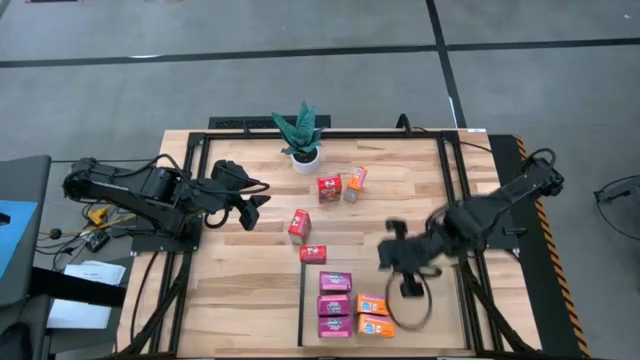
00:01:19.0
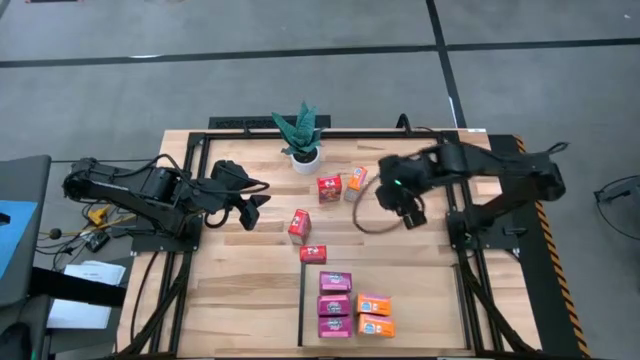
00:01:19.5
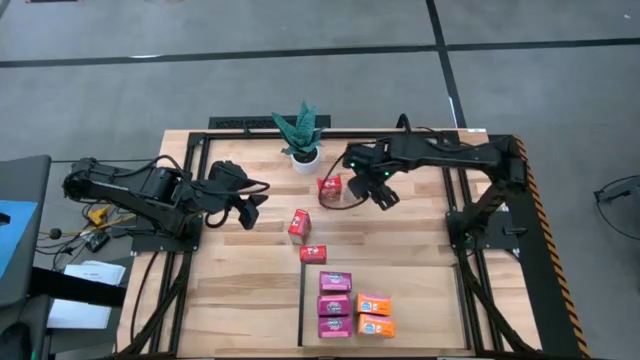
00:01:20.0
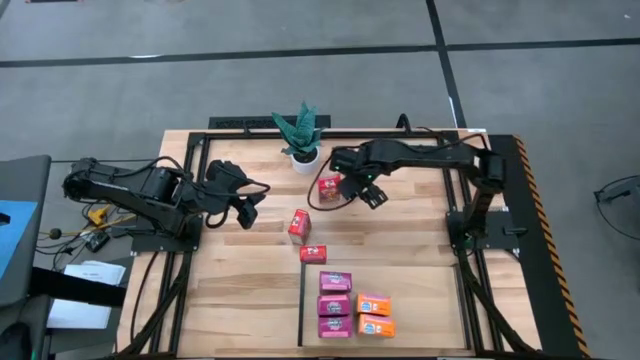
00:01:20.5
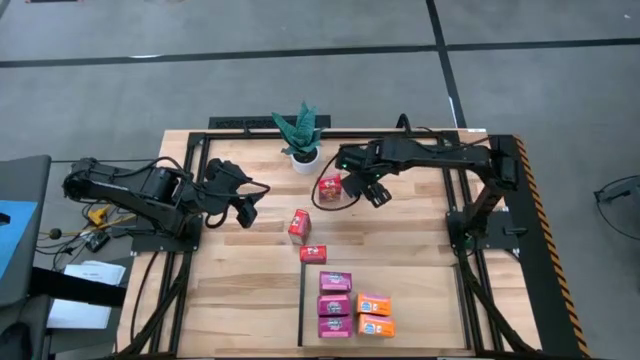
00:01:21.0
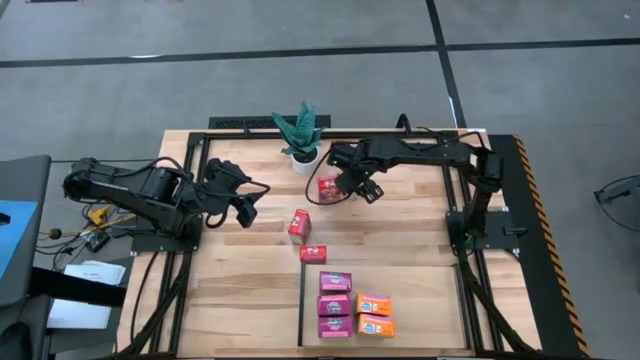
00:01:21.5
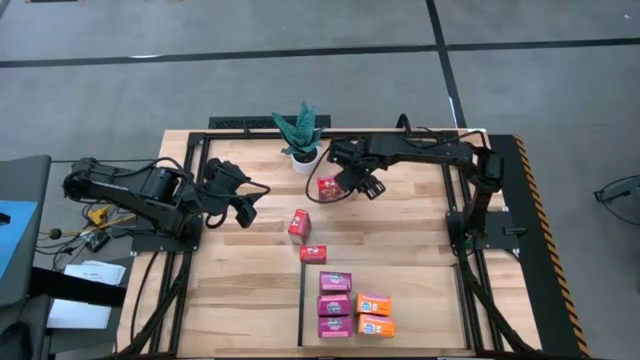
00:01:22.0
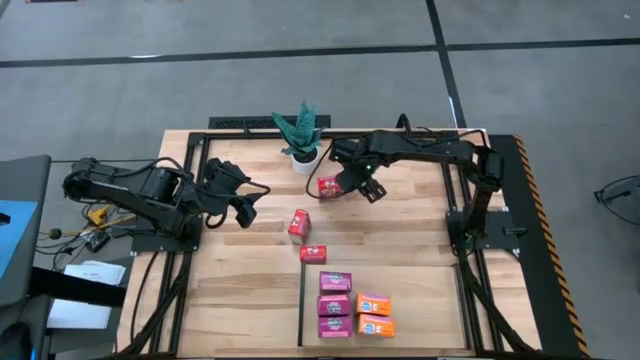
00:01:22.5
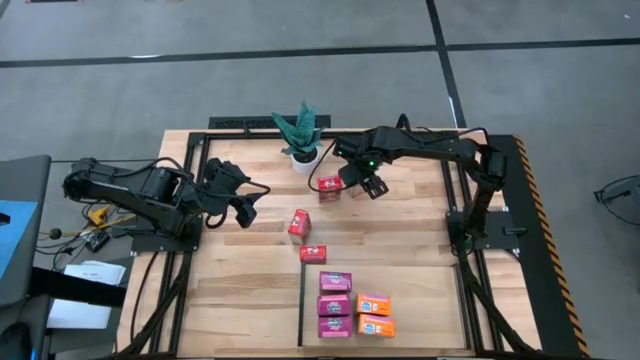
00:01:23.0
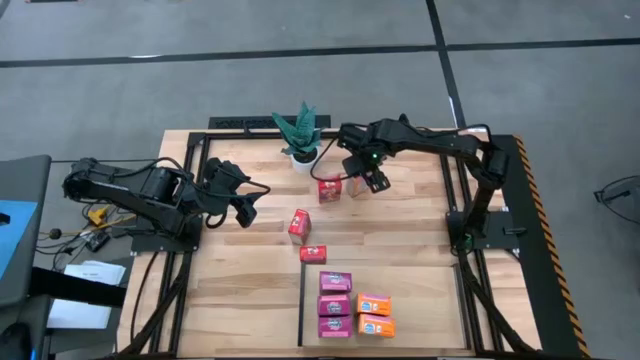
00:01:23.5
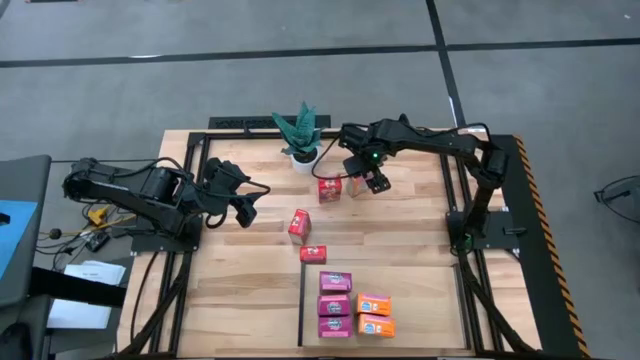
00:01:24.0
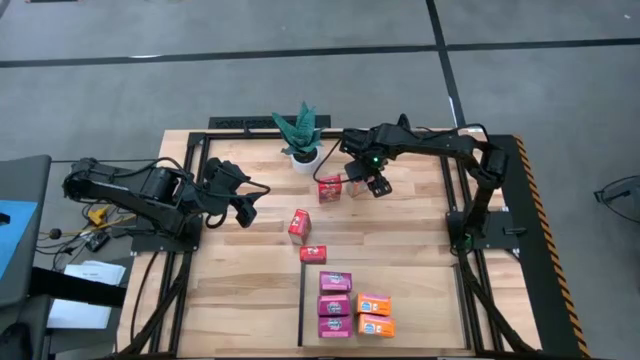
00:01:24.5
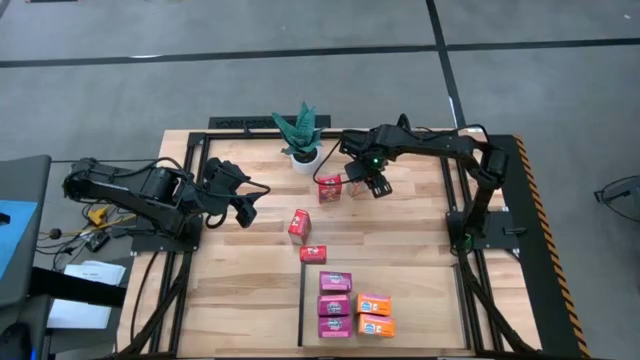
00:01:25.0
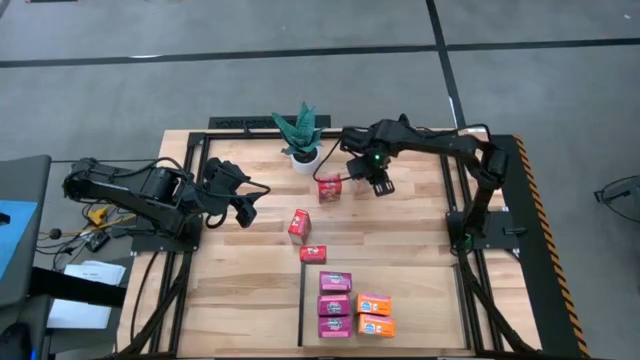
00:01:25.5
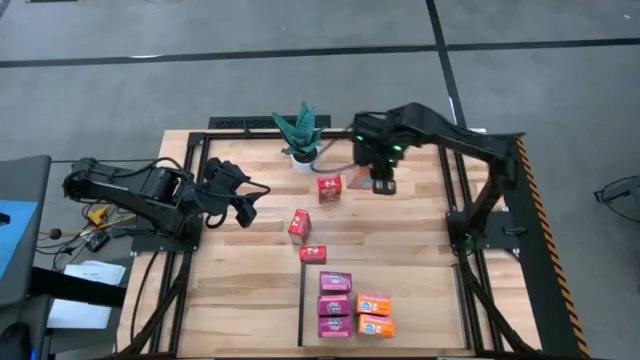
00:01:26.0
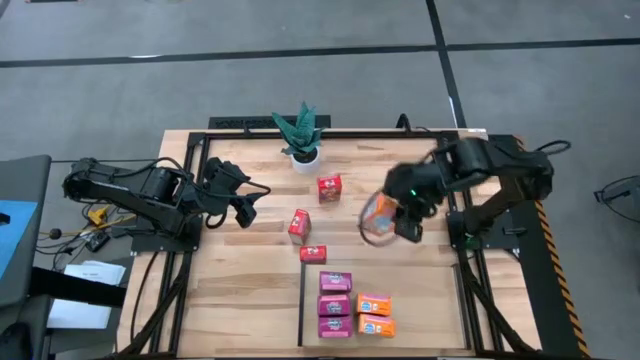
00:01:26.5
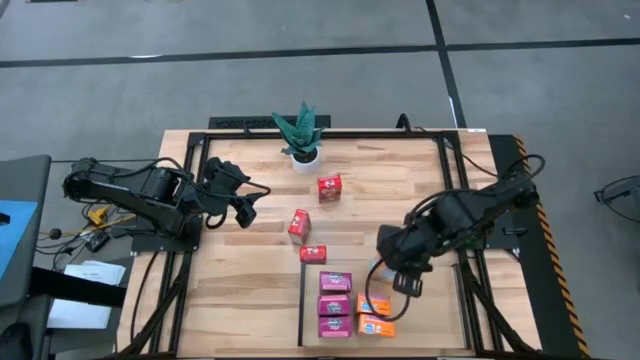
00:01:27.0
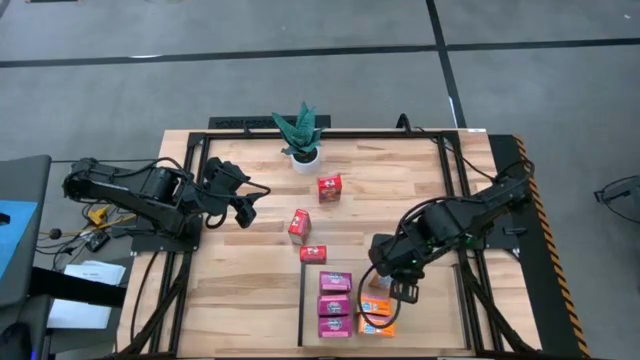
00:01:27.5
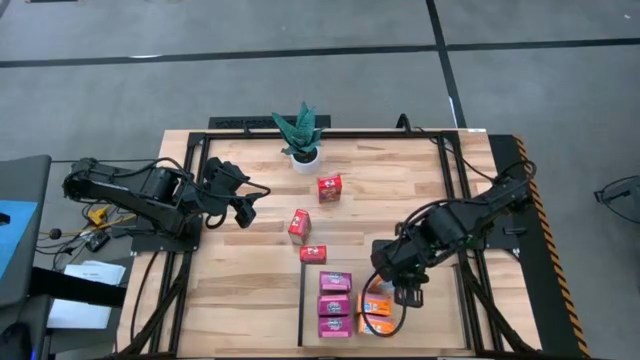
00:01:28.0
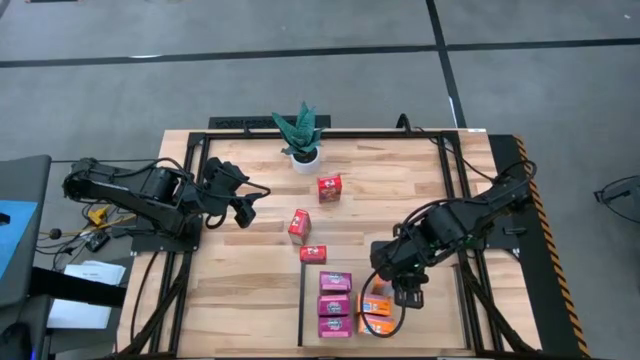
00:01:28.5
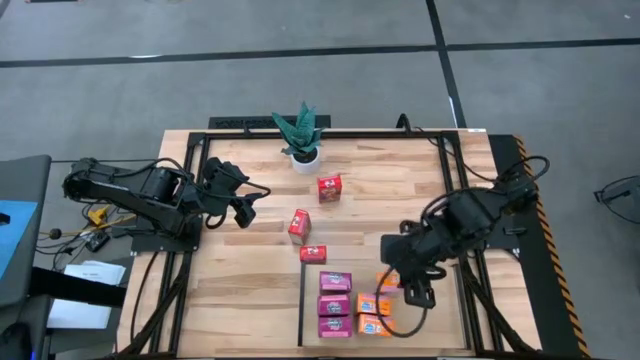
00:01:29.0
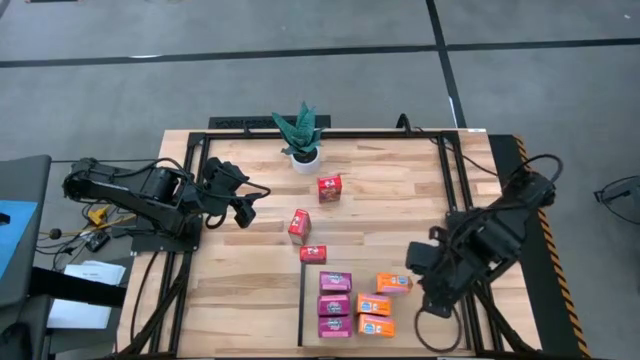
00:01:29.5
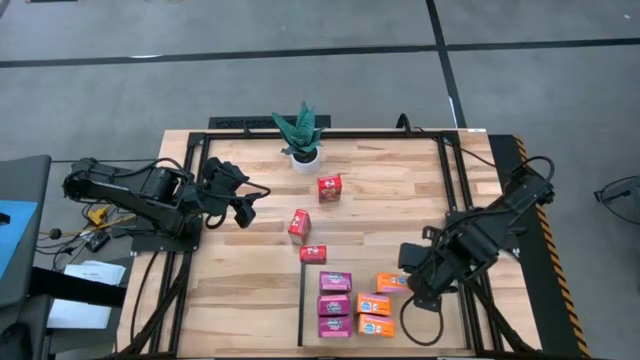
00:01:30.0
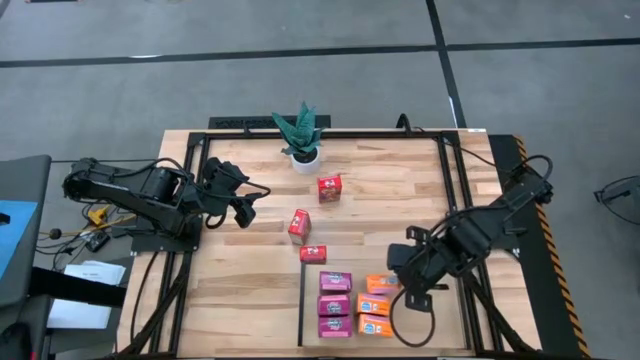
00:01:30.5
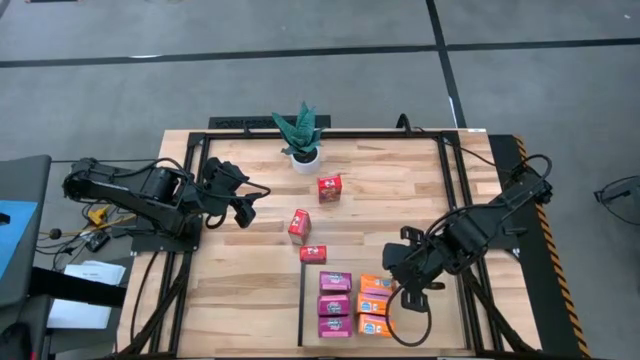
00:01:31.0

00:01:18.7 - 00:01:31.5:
Task: Stack cereal on shelf
Put the orange cereal box on the middle top shelf

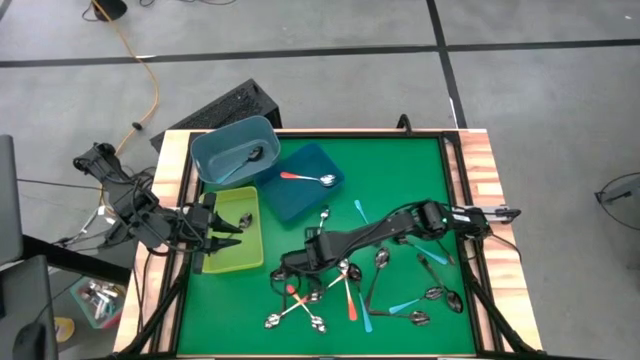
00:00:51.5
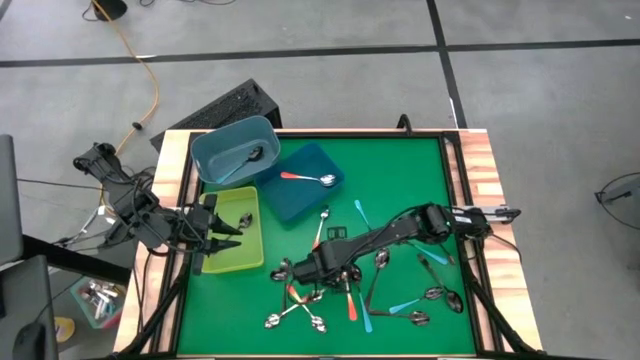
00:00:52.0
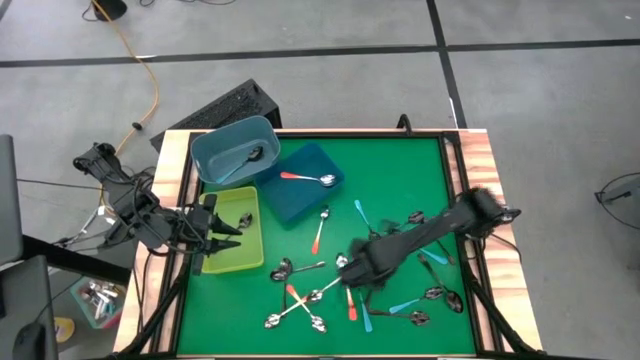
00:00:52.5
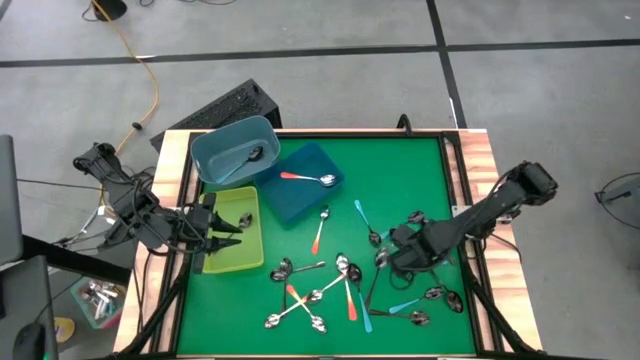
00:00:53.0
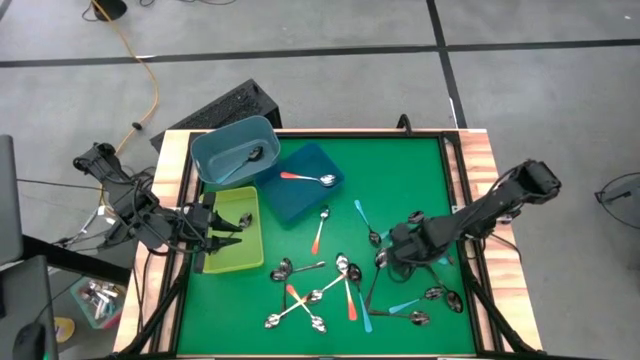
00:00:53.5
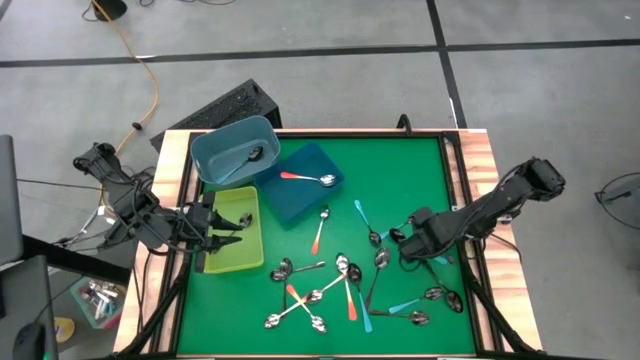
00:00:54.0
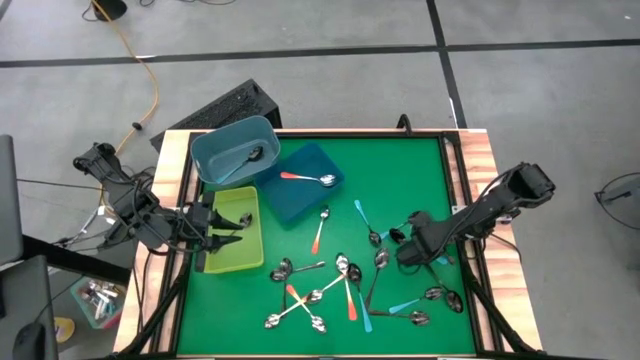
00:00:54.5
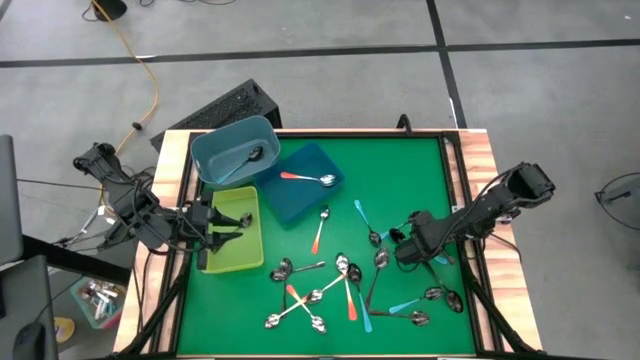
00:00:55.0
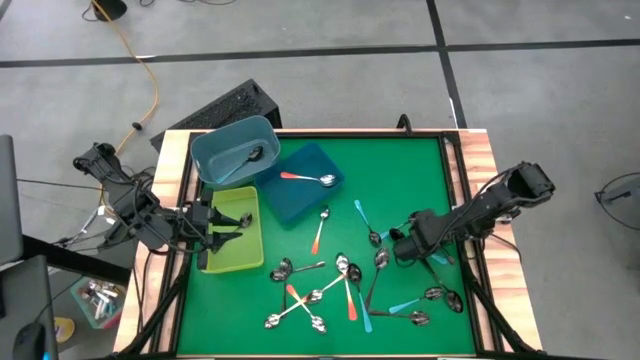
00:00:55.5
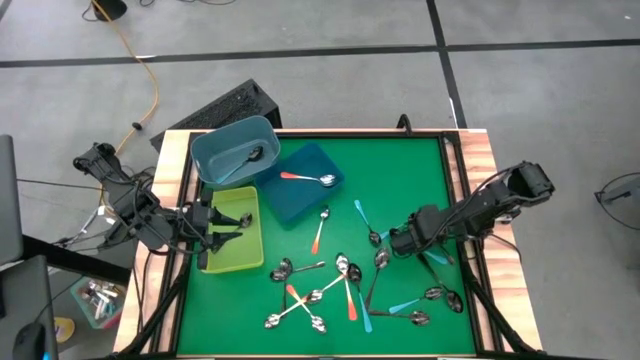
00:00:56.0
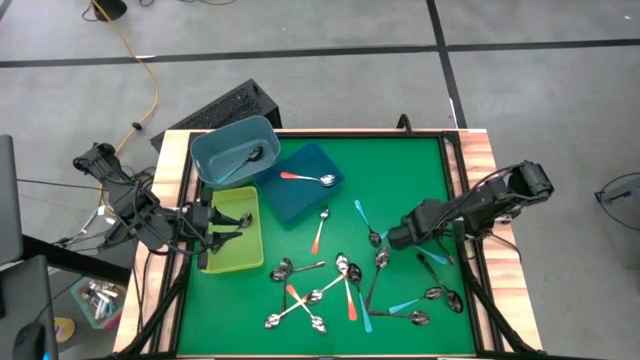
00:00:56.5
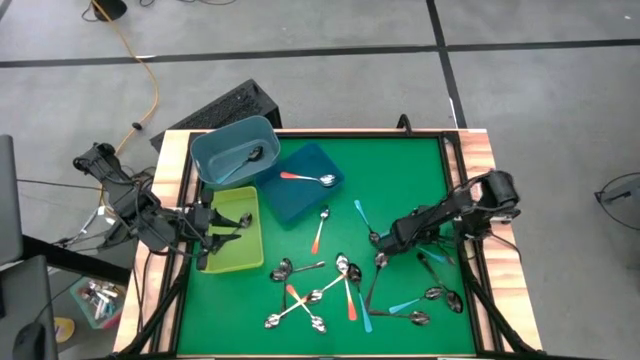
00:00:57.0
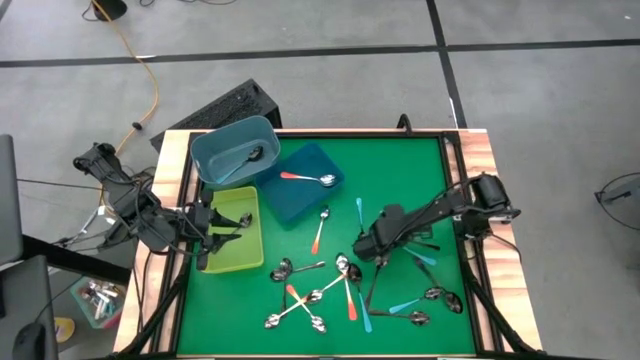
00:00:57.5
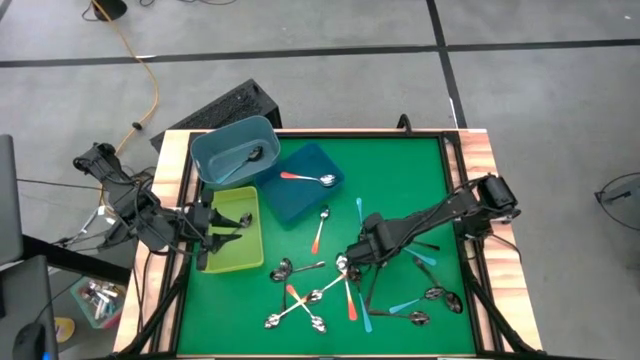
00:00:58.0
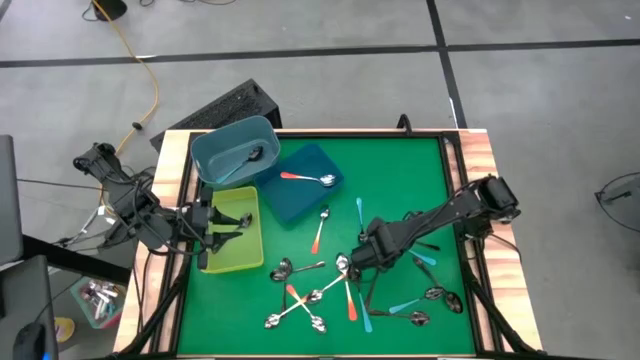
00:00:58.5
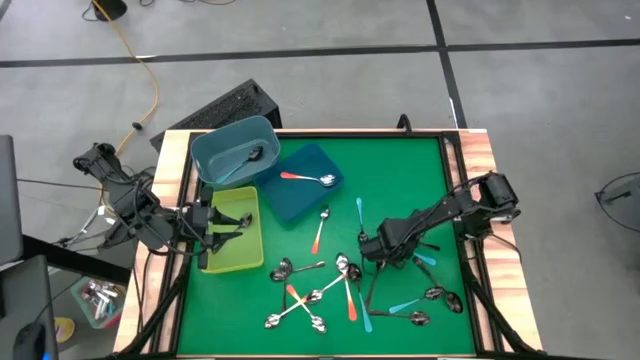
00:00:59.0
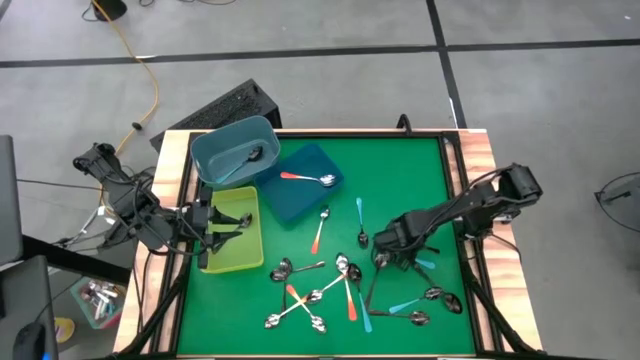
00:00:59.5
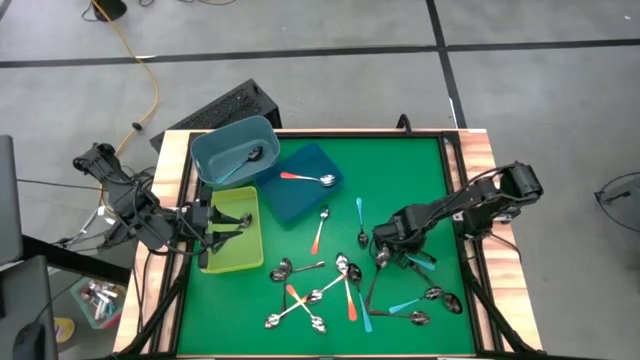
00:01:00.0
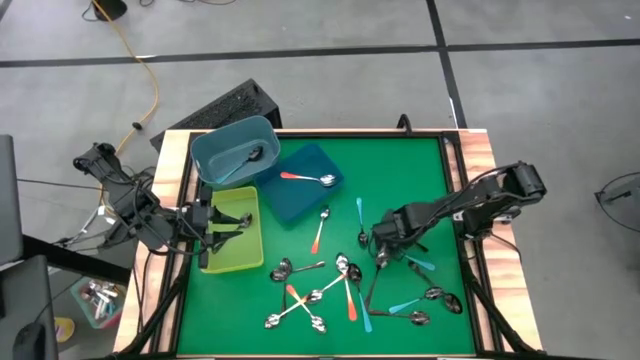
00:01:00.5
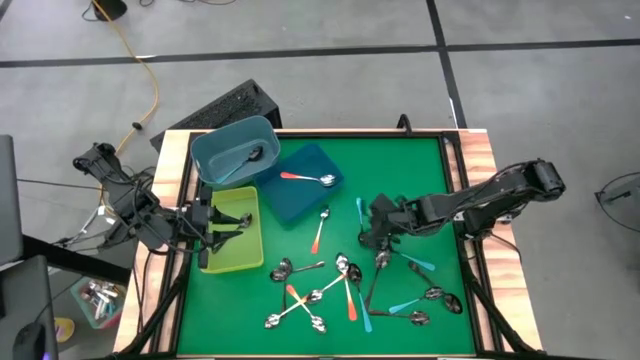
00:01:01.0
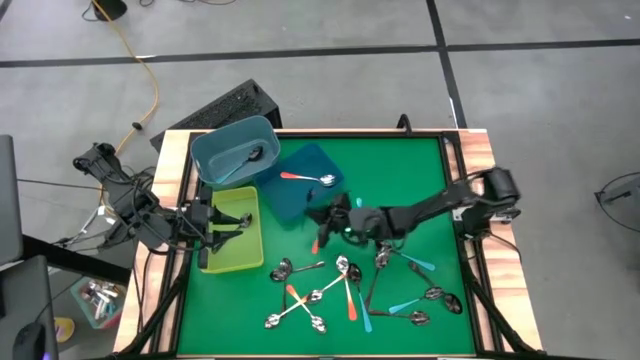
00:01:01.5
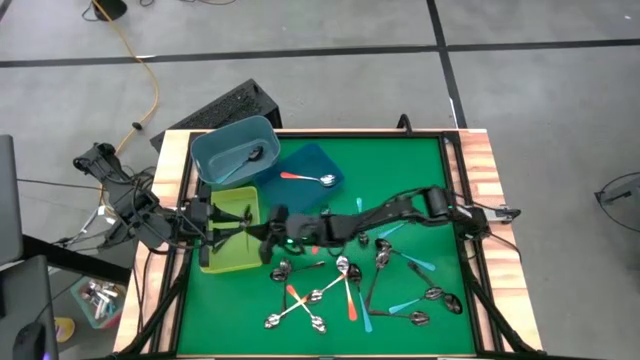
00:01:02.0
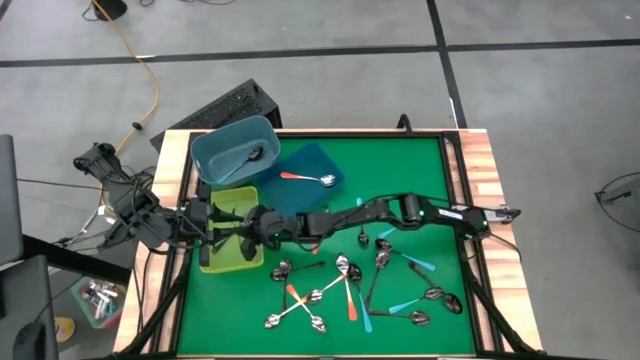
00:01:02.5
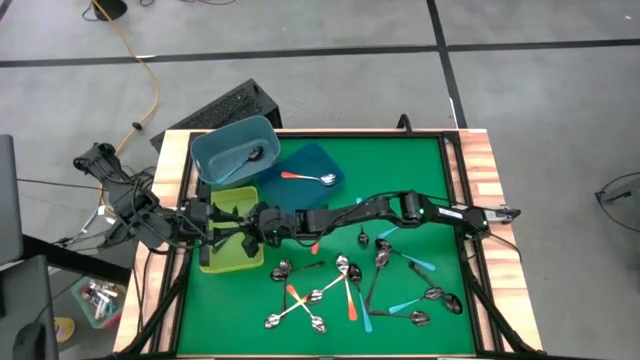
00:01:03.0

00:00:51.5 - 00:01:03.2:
Task: Sort silverware by color (type)
Put the black spoon into the green bin
